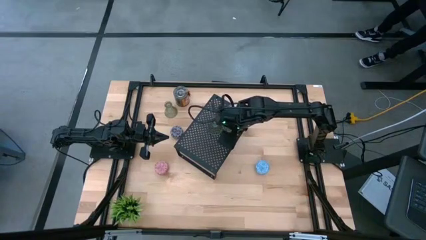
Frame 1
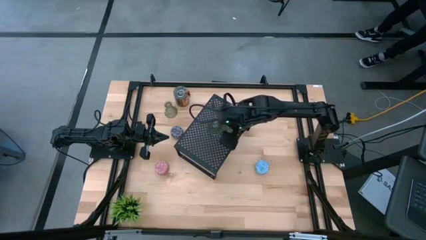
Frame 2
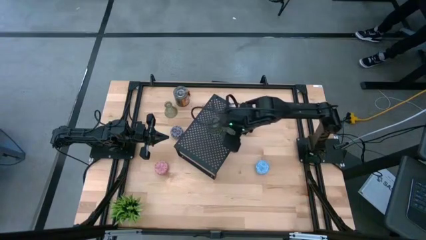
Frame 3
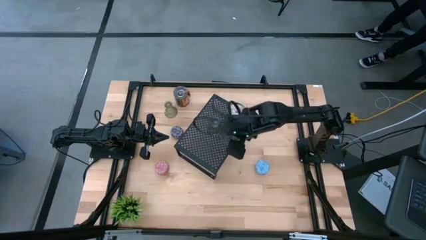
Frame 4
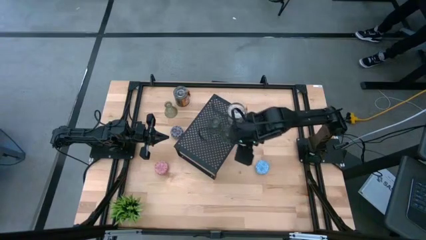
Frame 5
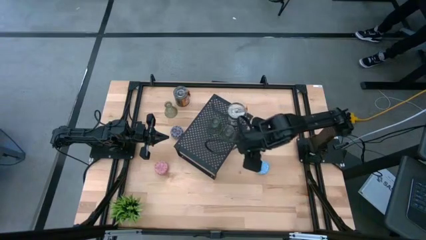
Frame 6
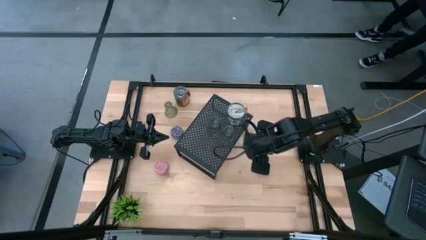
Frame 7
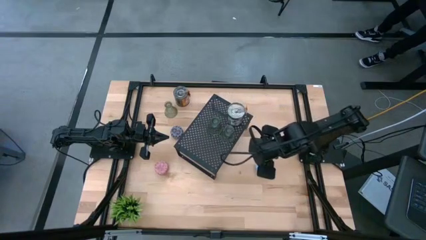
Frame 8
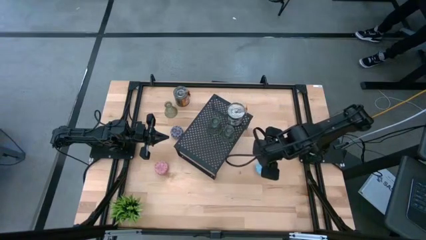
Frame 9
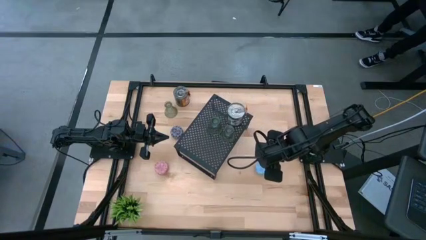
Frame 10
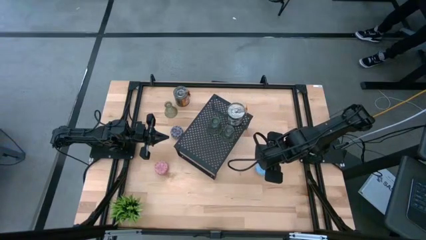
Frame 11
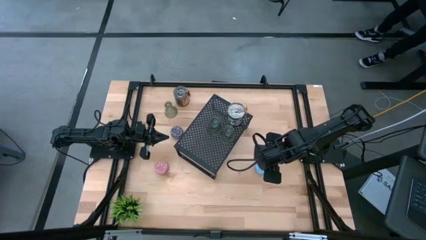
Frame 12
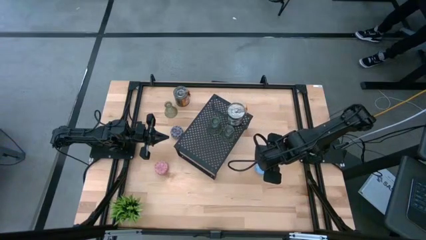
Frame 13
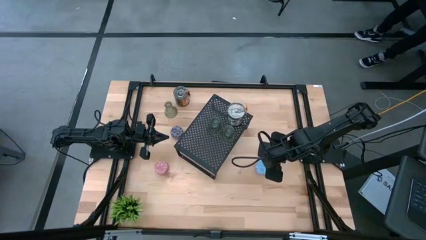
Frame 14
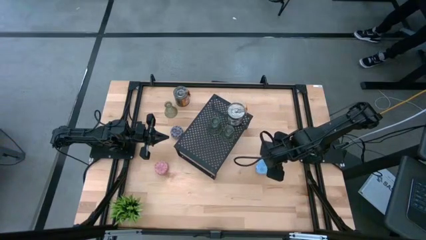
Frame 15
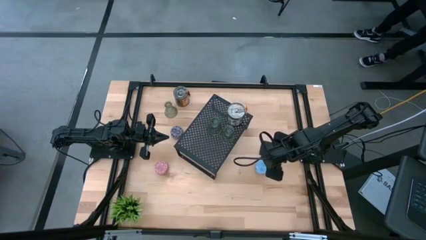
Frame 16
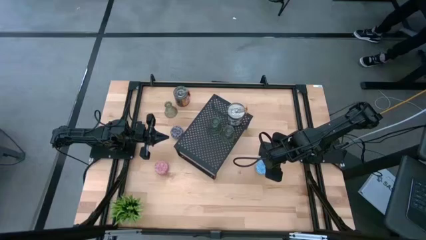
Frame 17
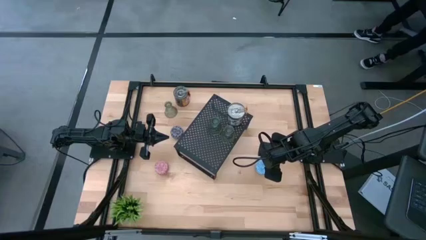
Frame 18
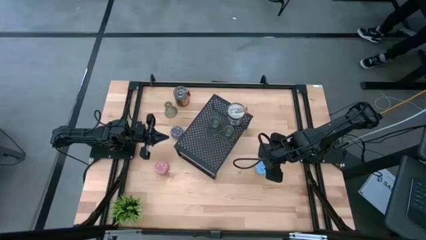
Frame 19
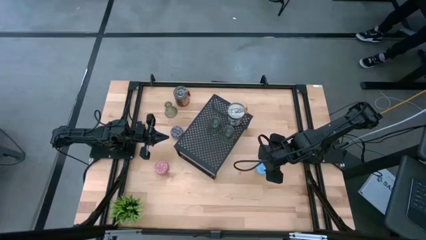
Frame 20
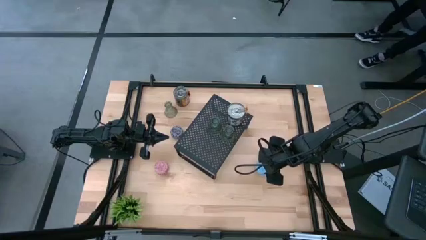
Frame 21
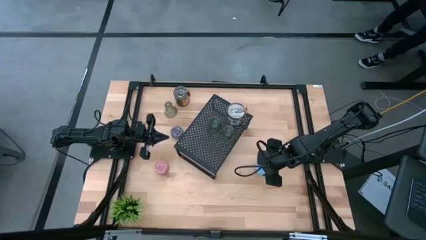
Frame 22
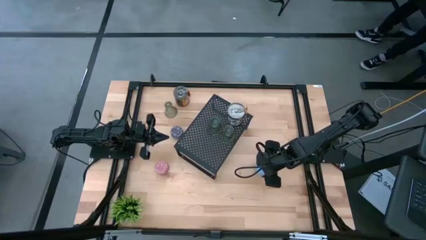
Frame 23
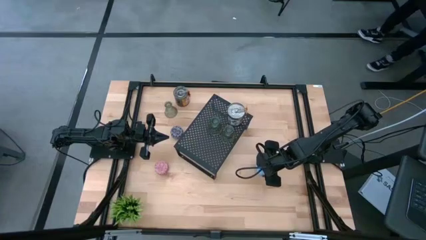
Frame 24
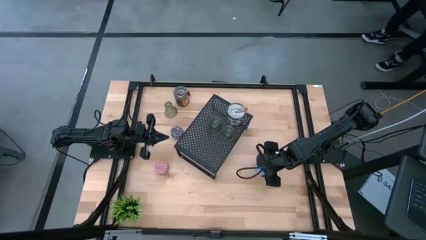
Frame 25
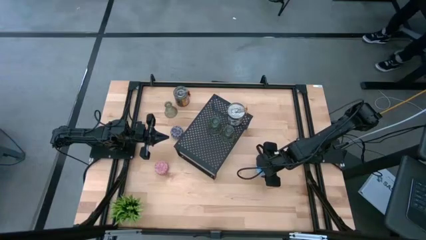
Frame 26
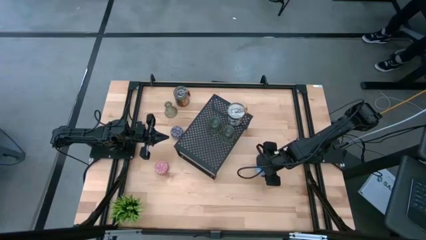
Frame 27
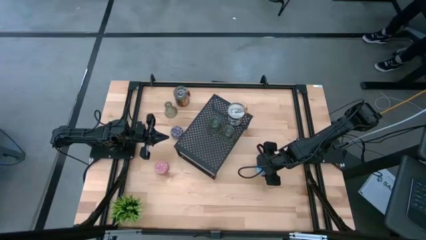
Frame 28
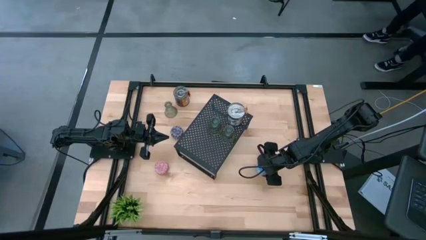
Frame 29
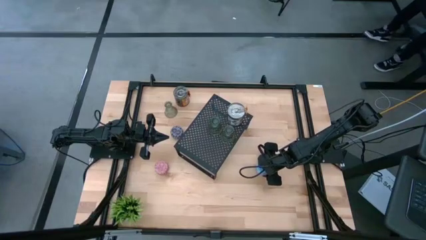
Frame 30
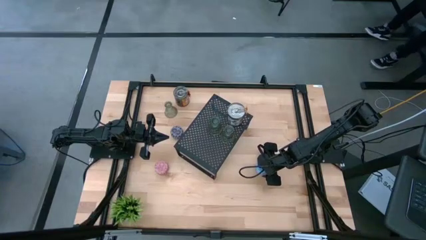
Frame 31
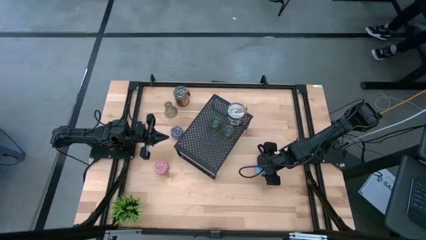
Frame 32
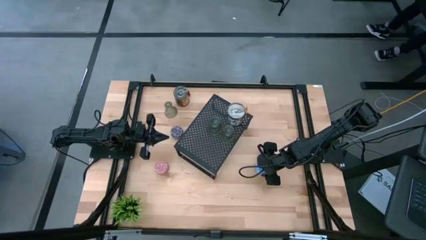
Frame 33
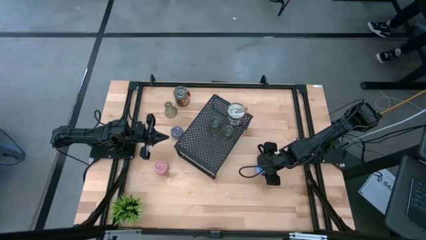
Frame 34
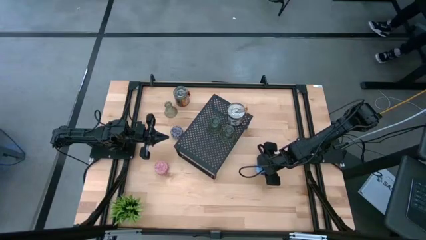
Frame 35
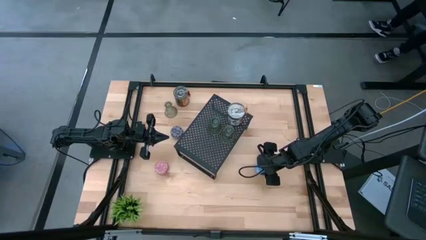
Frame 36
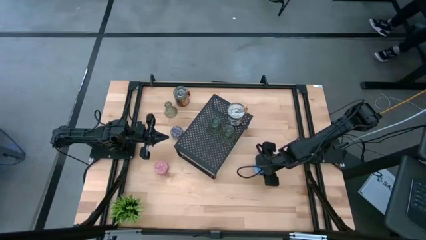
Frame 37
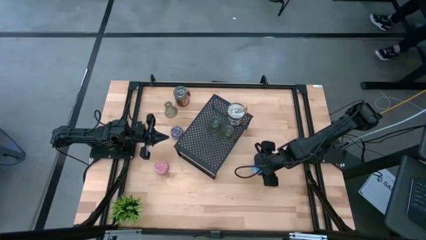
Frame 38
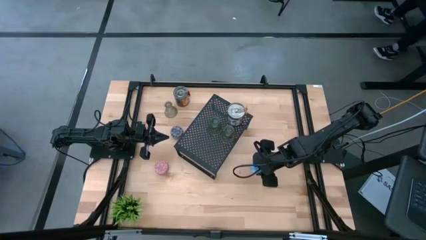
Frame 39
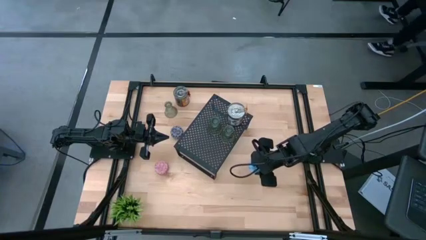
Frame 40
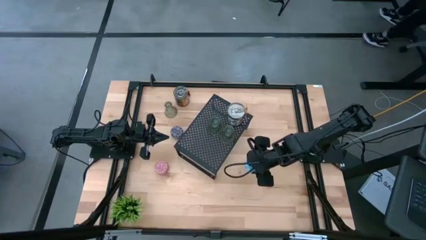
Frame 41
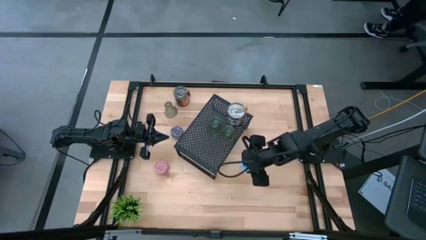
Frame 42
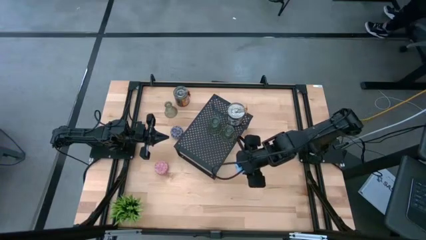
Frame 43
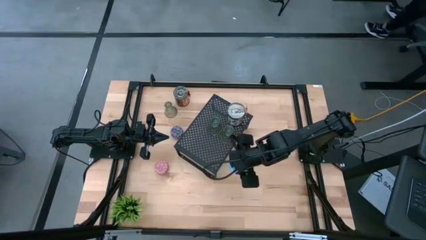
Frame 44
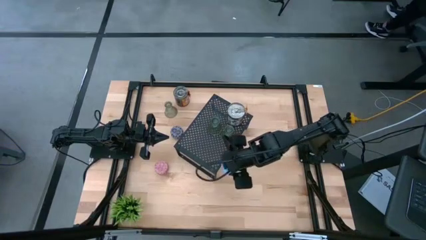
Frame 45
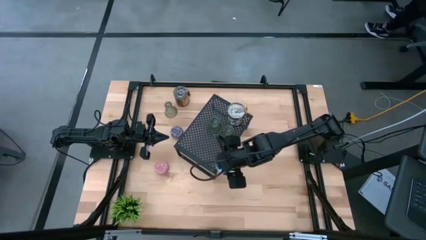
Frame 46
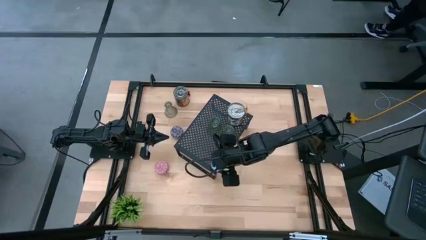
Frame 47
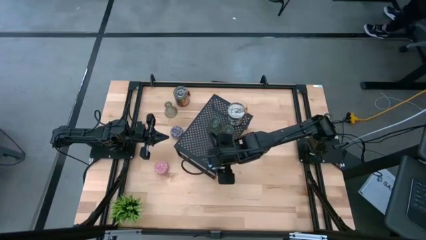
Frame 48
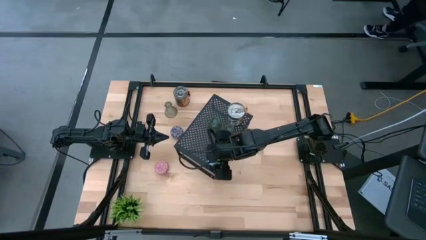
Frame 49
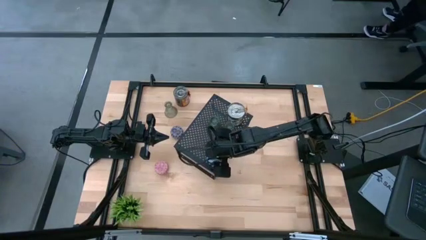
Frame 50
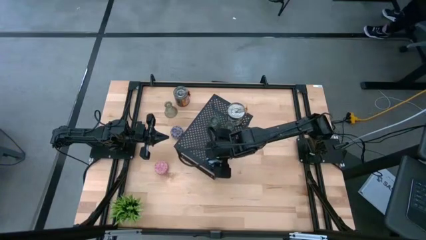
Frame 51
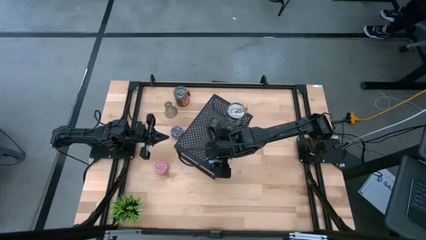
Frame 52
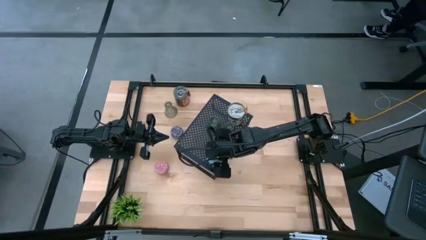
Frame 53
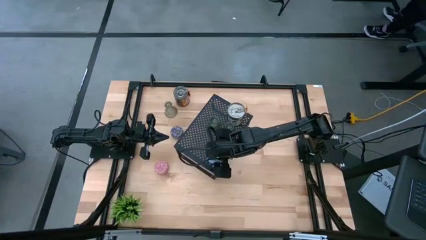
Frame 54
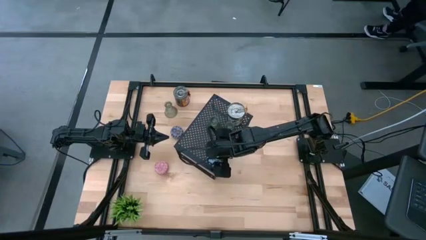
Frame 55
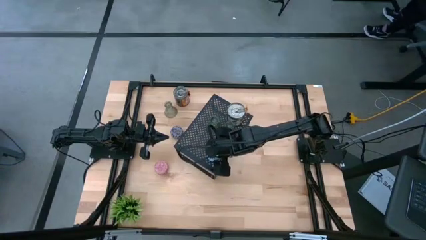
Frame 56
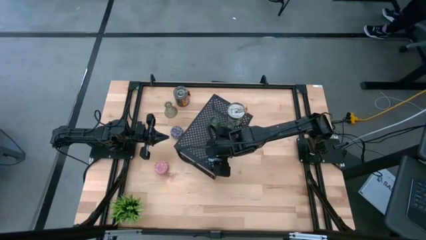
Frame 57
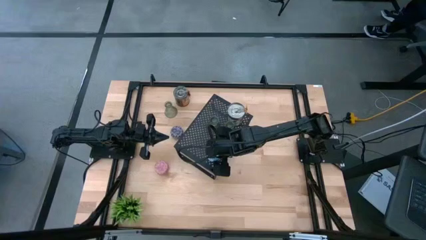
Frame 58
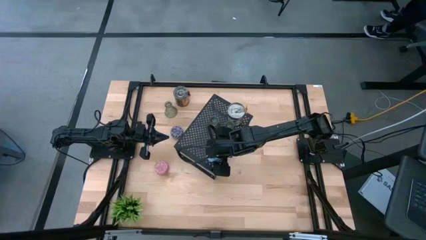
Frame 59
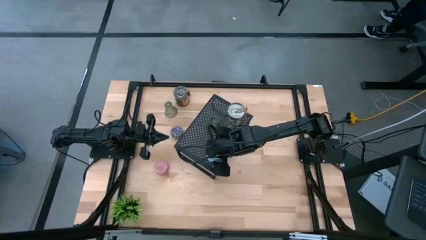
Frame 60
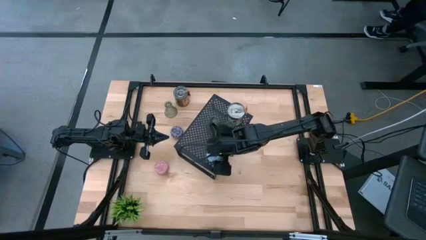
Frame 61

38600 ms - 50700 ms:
Task: Pick & Place candle stick holders
Put the blue scented candle on the shelf

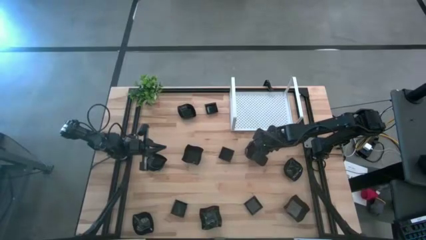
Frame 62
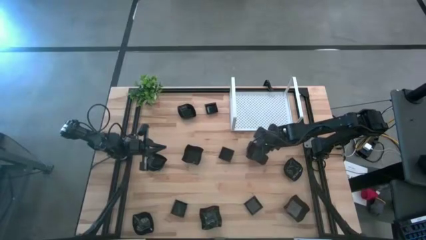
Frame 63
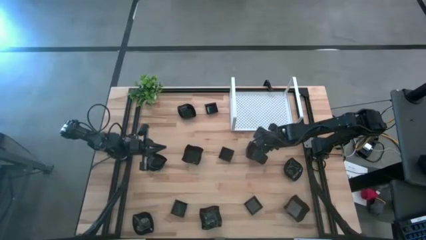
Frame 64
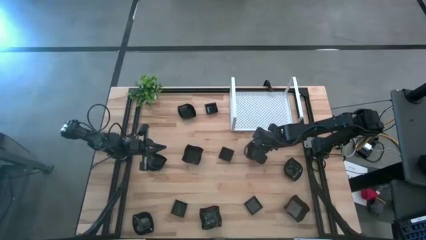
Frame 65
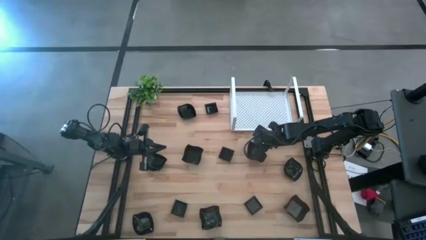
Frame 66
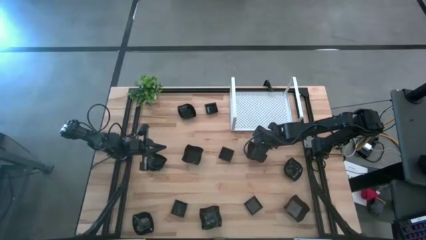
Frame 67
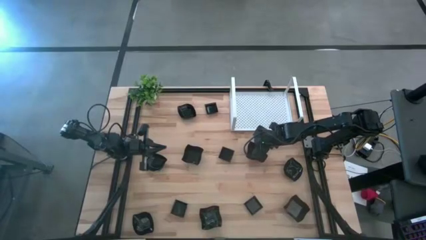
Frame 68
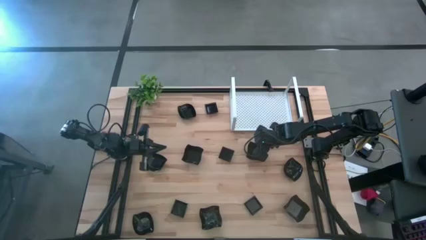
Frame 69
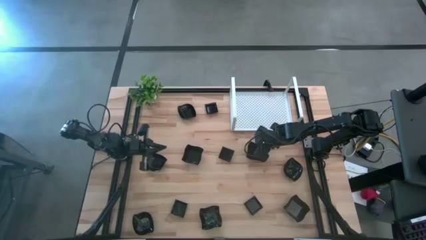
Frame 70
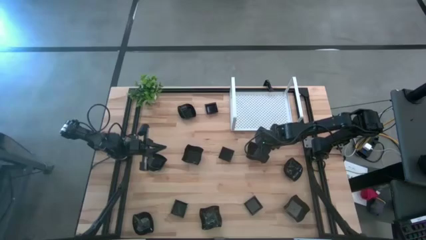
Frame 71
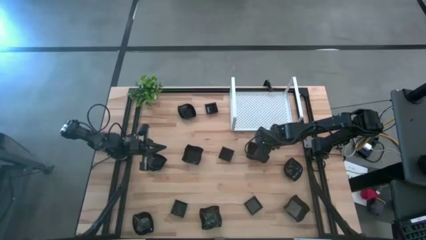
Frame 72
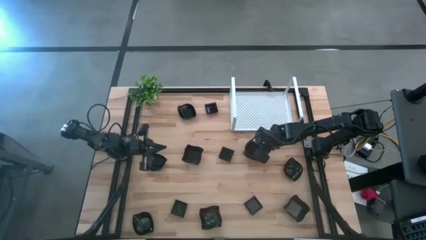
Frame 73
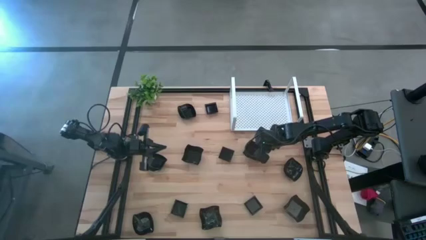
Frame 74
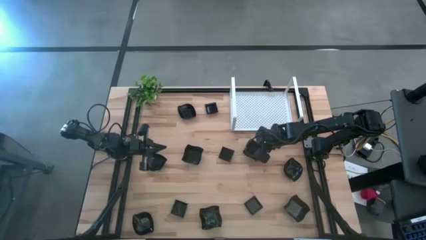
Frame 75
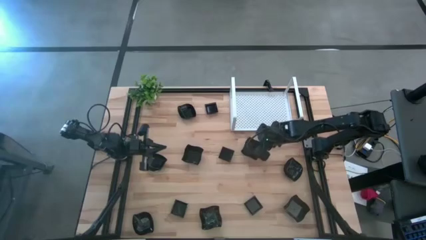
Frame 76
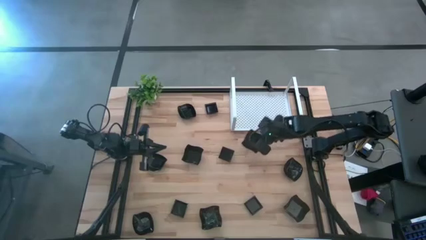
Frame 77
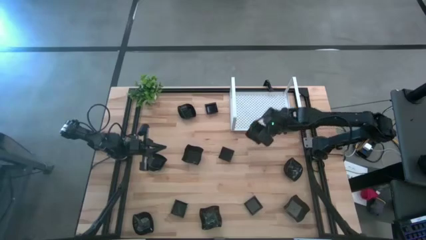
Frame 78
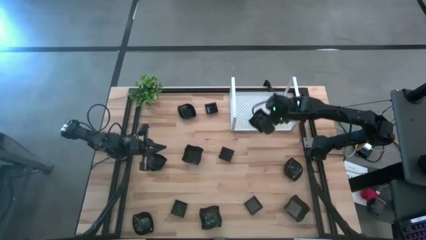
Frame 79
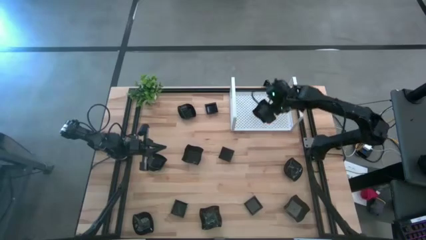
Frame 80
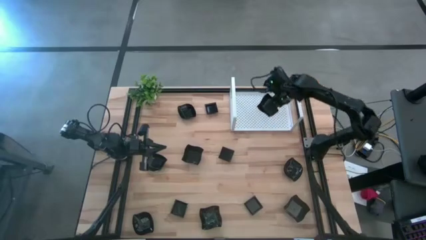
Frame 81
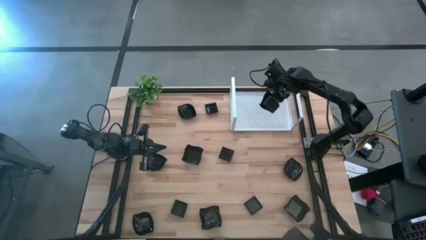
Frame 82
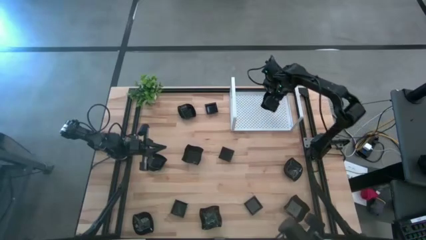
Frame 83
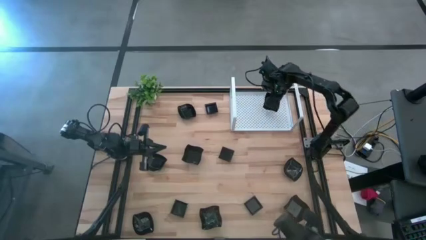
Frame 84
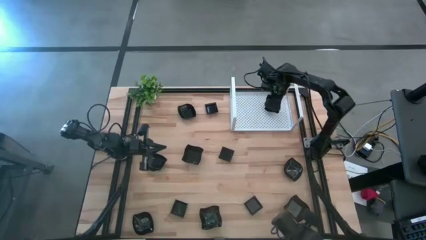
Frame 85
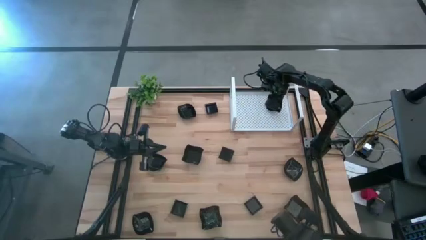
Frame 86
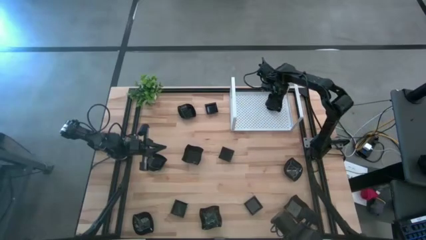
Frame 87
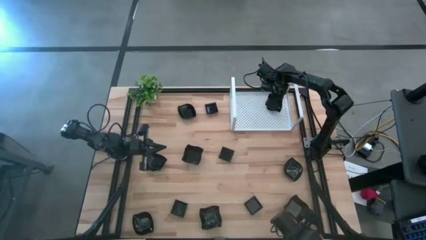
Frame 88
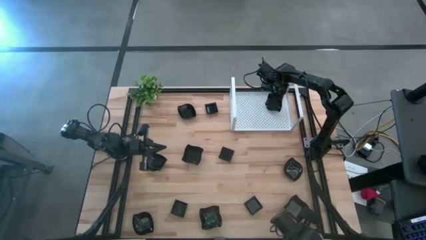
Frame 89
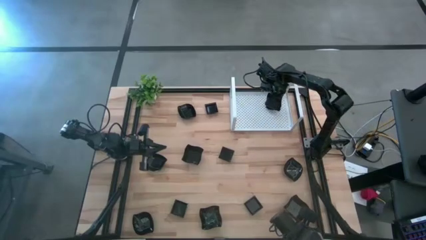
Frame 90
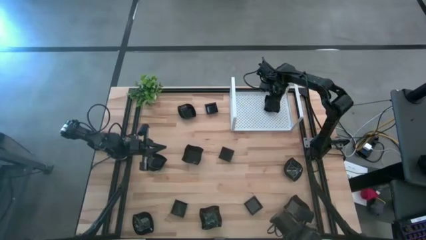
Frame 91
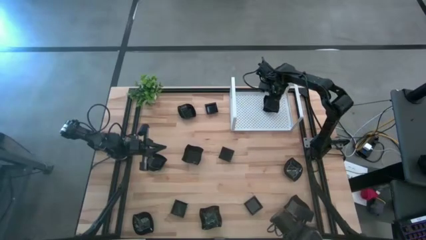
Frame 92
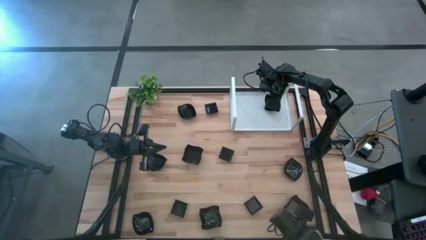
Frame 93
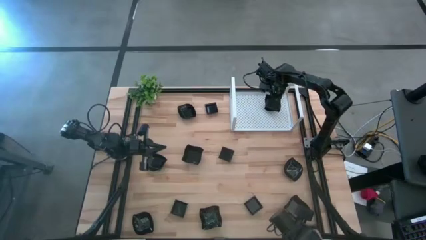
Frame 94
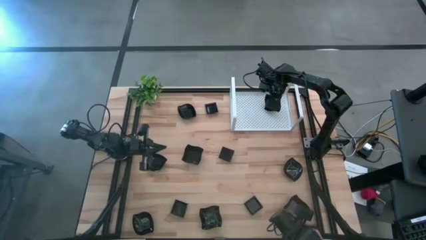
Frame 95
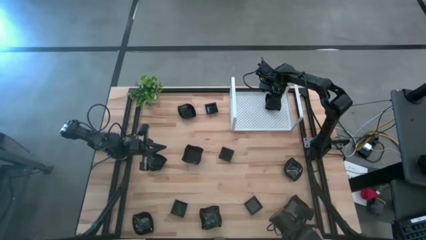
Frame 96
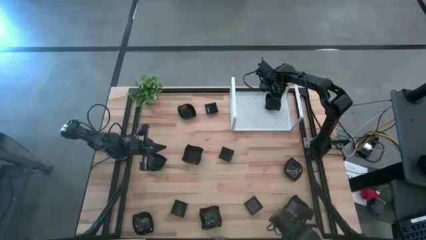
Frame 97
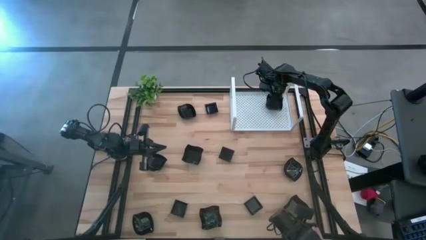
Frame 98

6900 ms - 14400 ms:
Task: Pick & Place Mini shaped plates
Put the distorted square plate on the shelf
